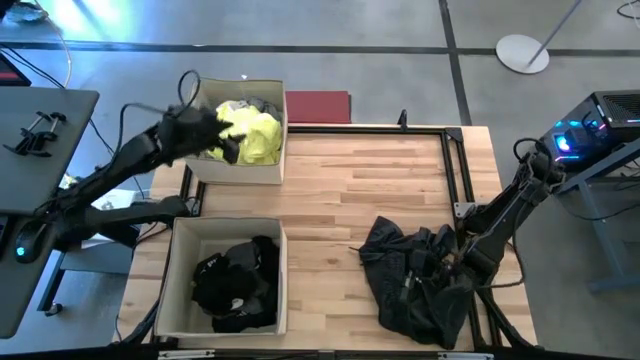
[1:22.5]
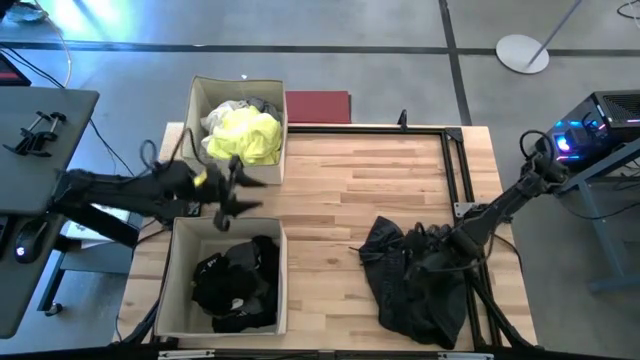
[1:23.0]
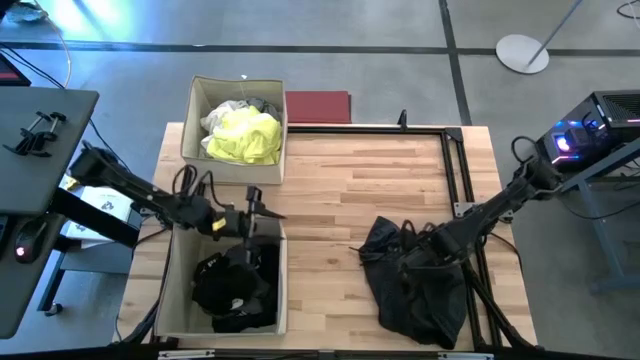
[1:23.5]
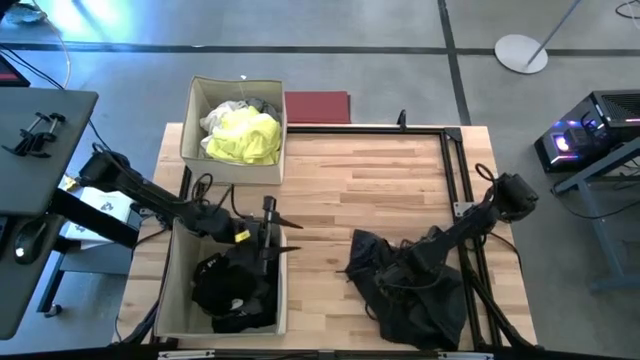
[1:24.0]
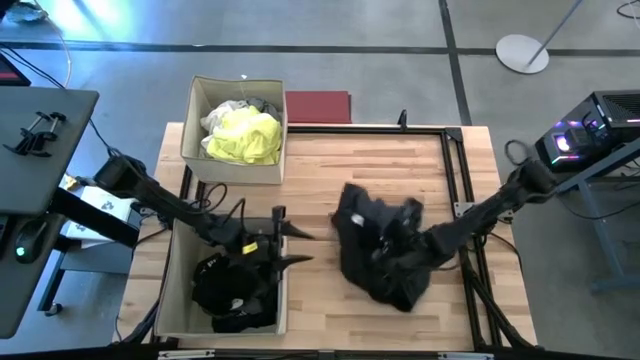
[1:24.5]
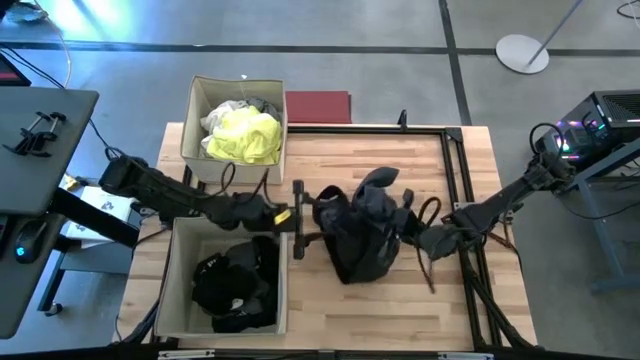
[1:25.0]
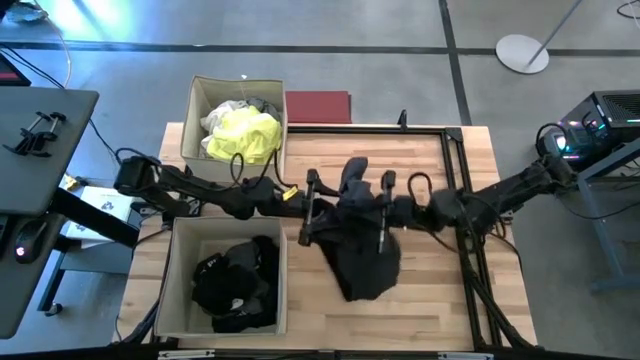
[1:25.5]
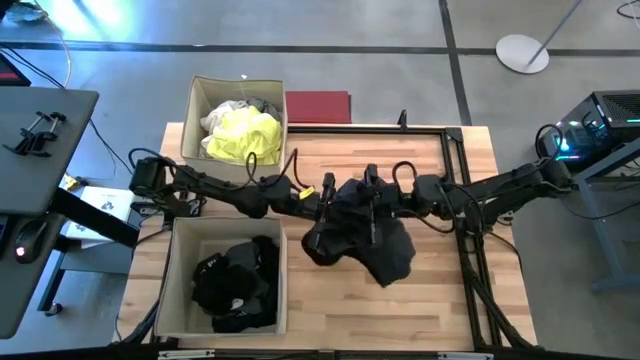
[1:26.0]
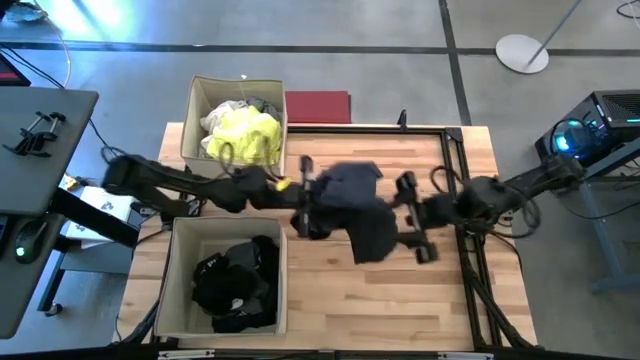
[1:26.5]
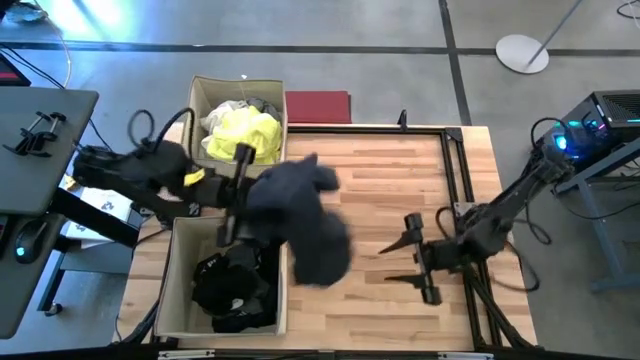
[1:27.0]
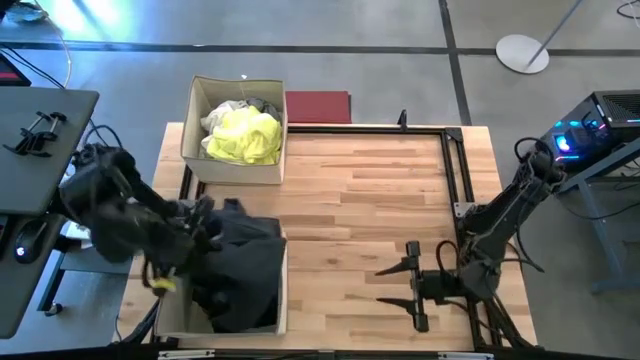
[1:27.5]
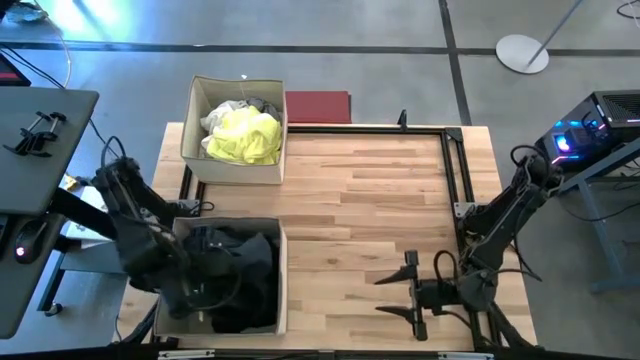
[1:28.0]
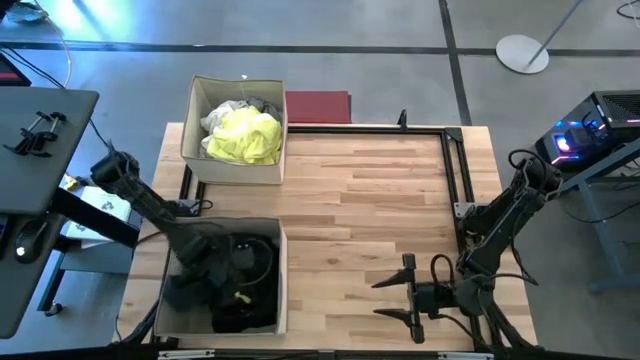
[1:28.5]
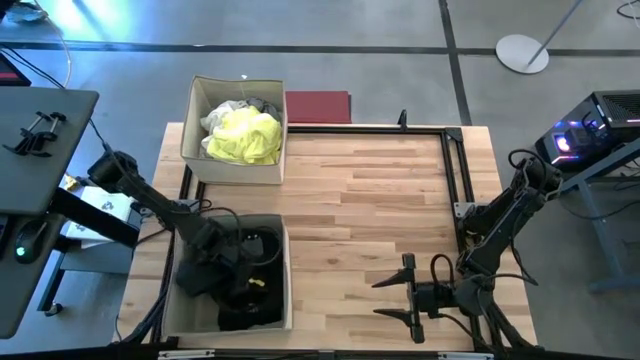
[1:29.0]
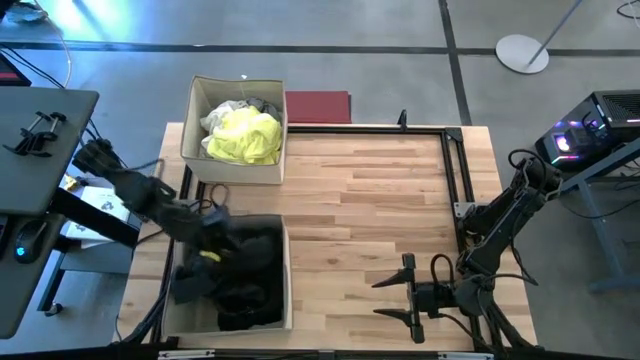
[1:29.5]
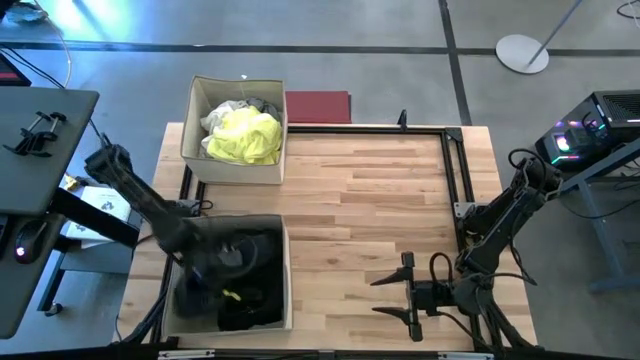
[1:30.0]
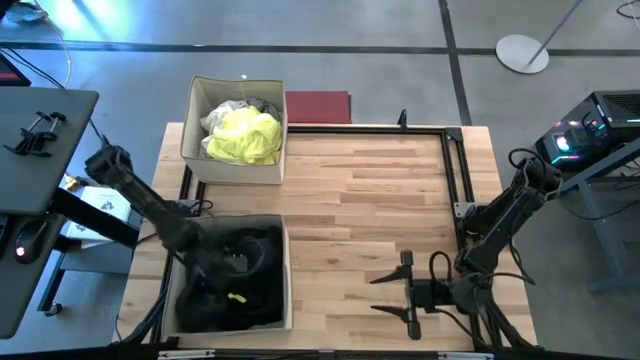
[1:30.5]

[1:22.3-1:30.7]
Task: Sort clothes
Put the black shorts into the bottom laundry organizer

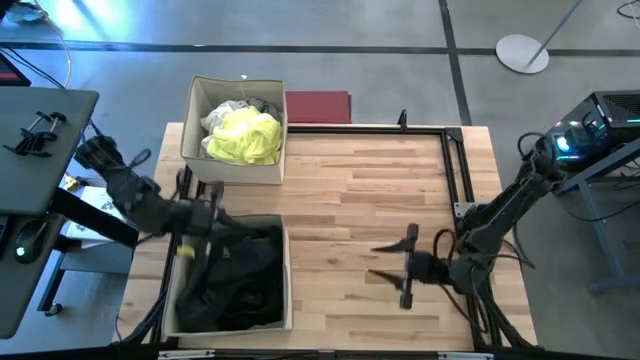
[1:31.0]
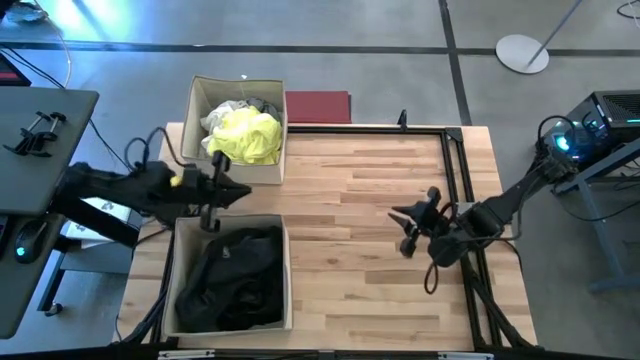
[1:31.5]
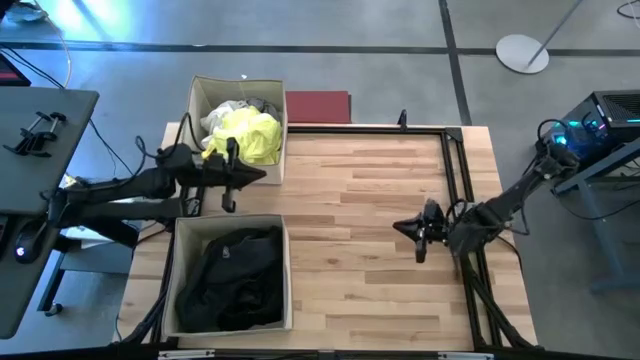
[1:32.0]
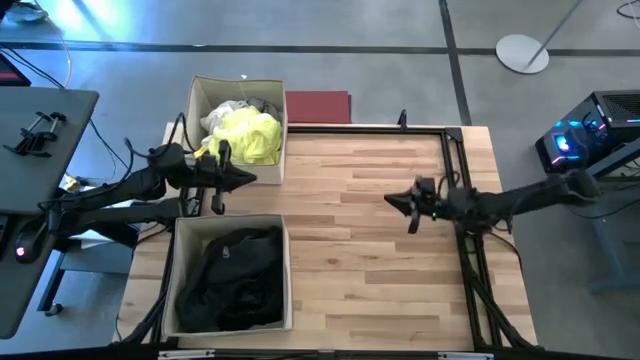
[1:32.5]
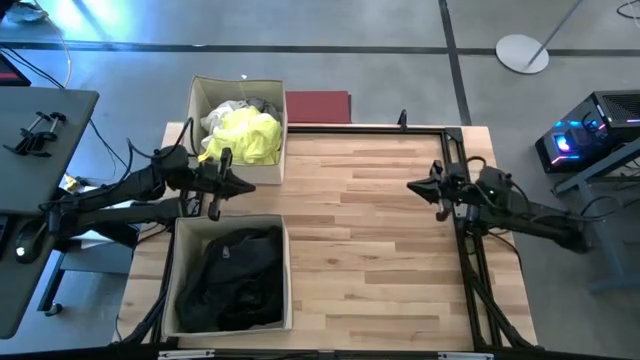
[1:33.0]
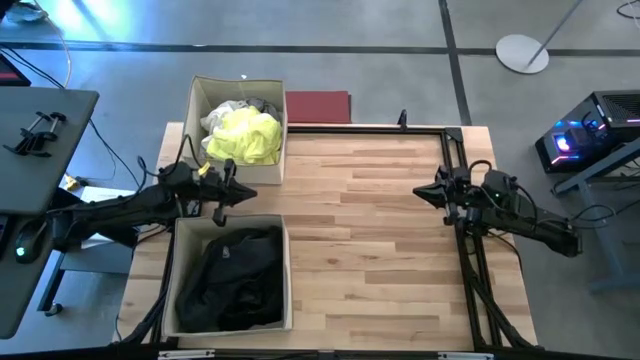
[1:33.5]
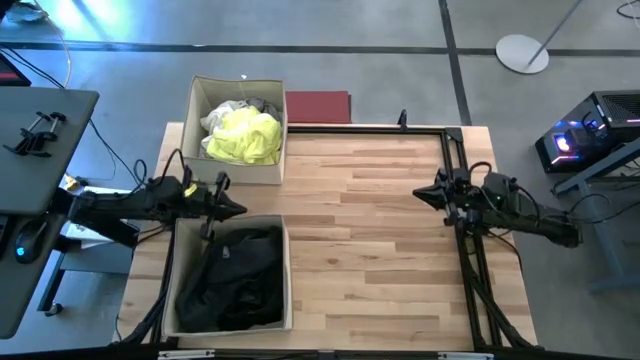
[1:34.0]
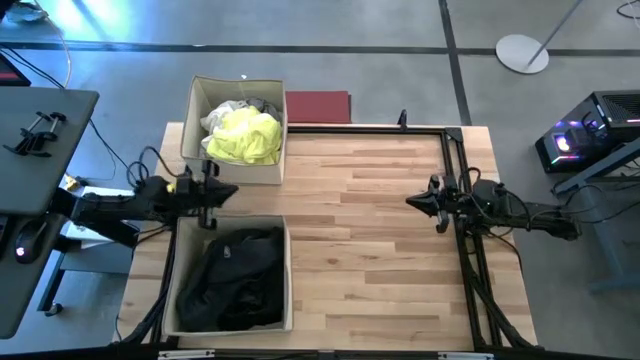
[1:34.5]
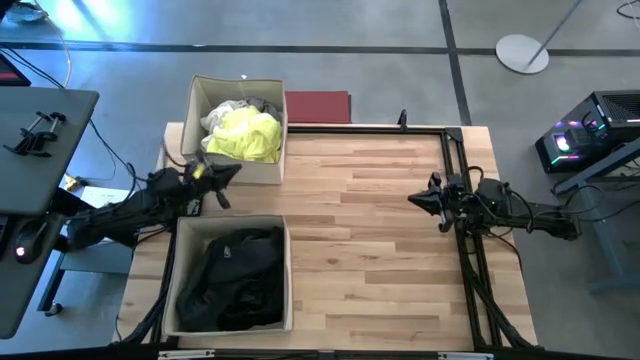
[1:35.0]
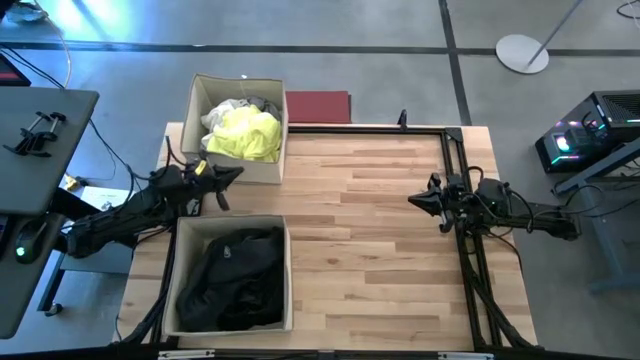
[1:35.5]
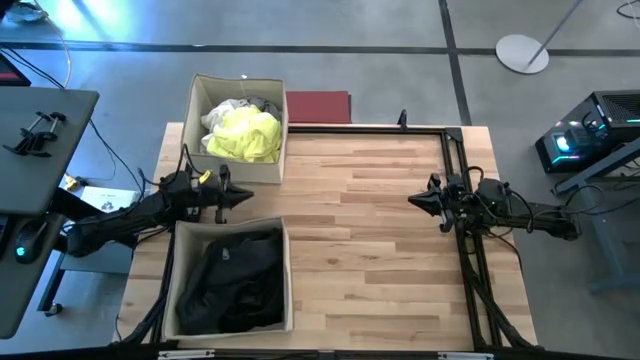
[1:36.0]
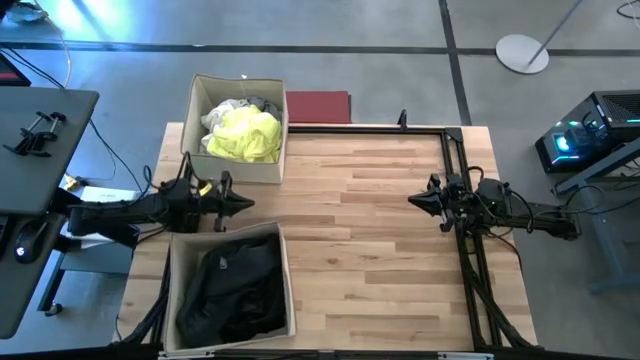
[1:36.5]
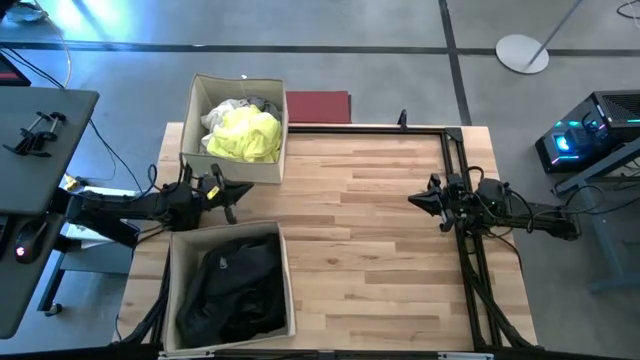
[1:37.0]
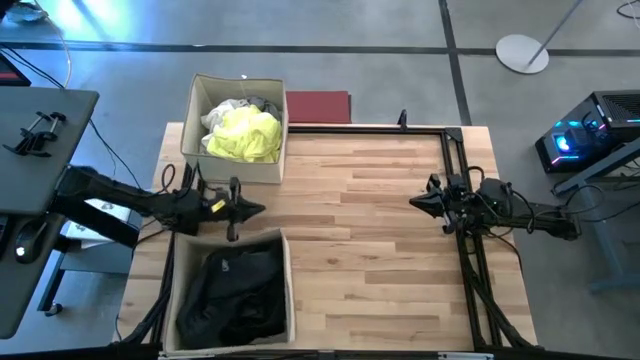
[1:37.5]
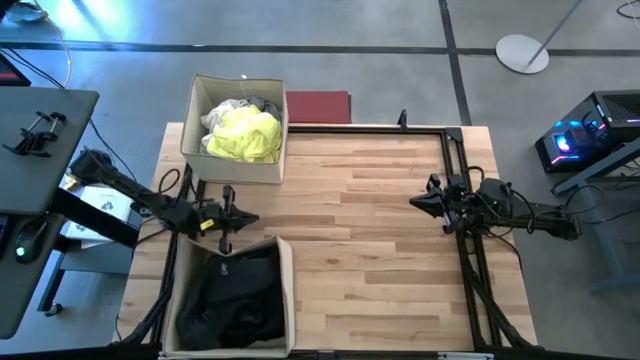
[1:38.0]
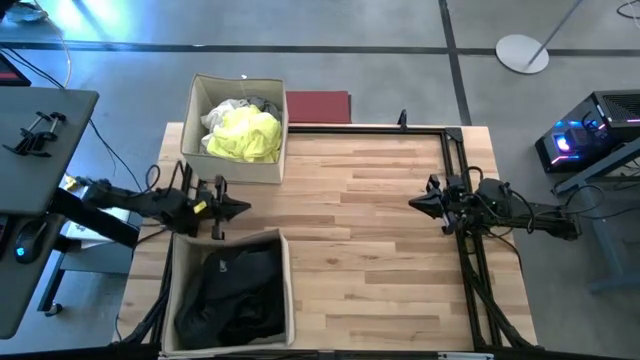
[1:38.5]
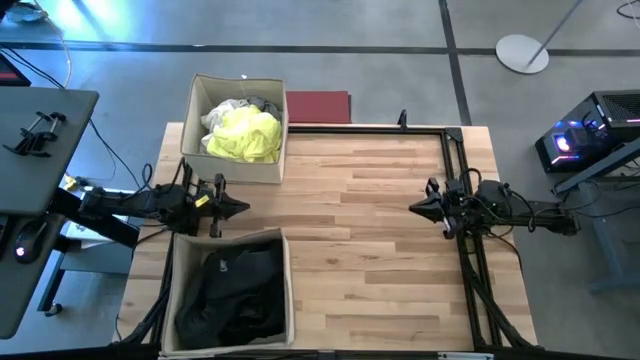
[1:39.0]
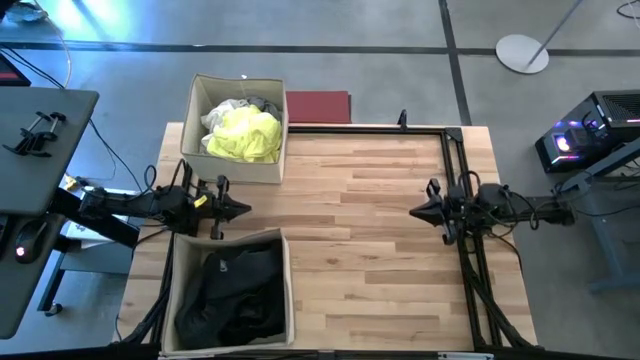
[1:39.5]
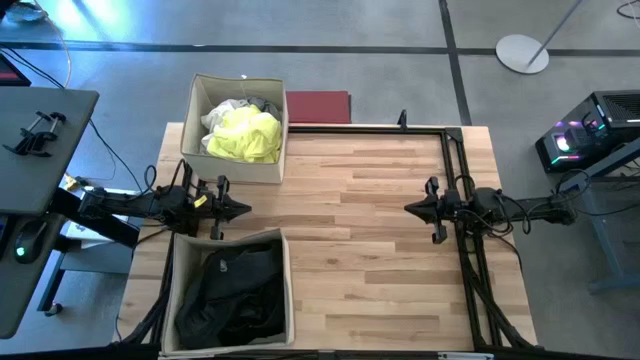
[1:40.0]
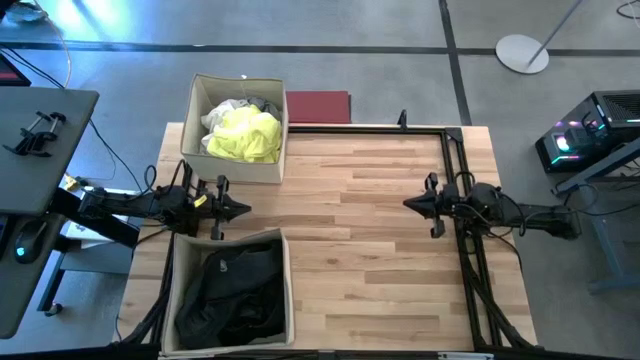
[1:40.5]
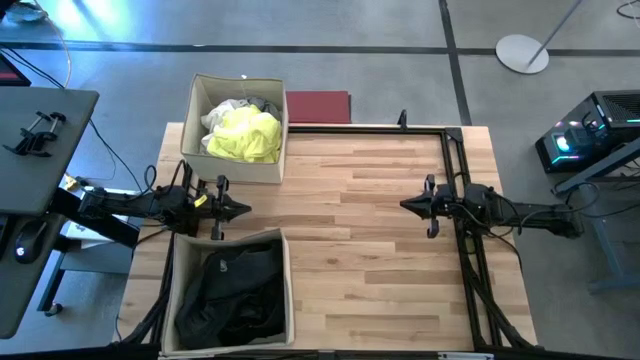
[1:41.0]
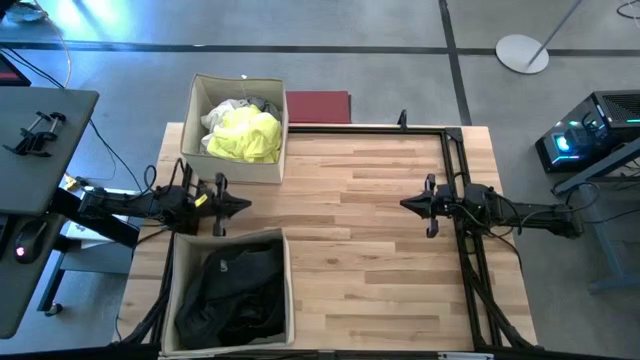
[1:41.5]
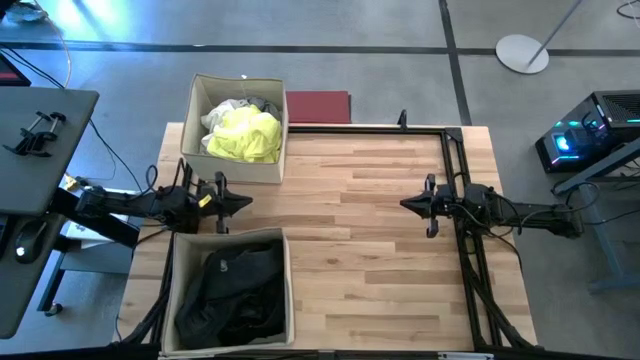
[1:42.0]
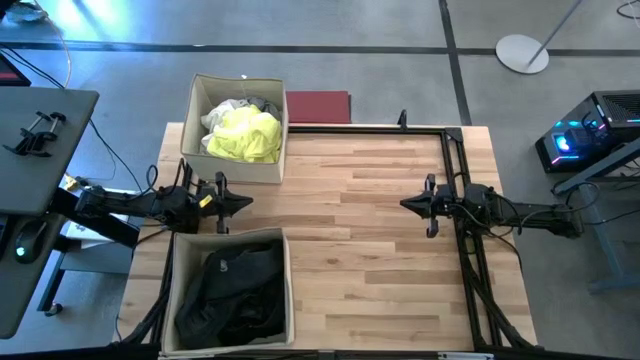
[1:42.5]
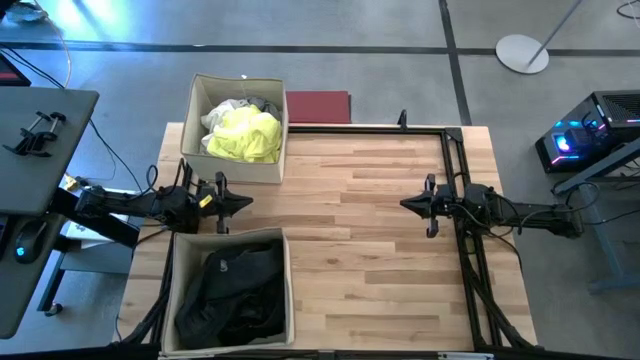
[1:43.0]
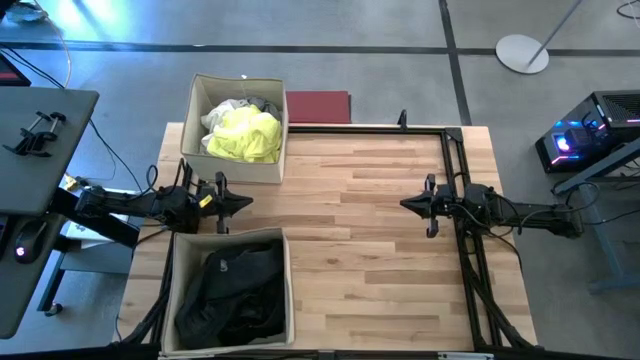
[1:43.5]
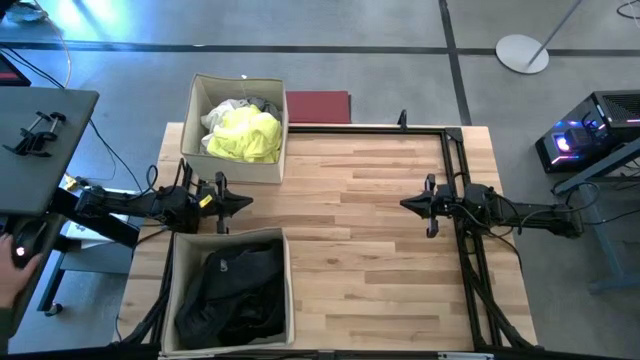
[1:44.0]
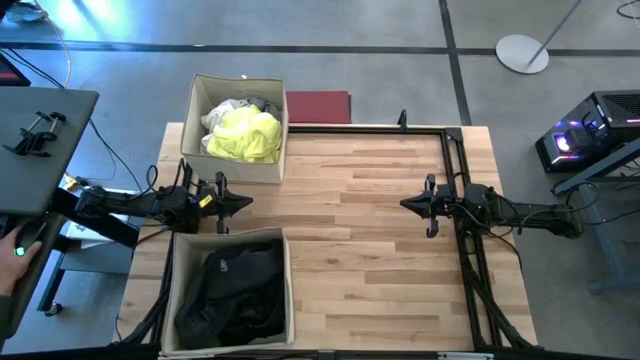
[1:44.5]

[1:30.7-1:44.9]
Return to Home Position
